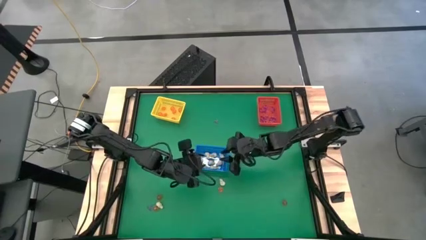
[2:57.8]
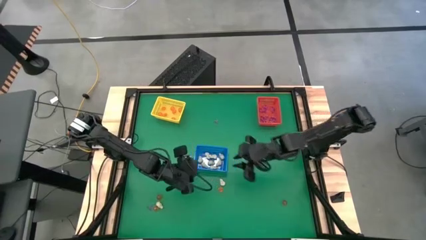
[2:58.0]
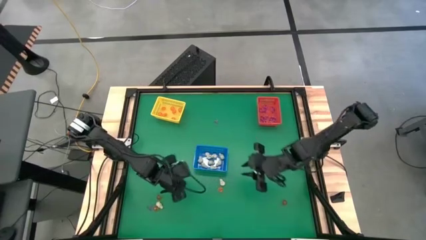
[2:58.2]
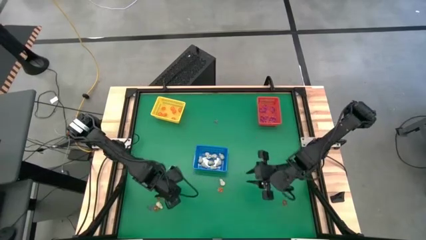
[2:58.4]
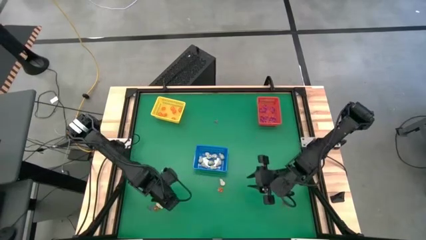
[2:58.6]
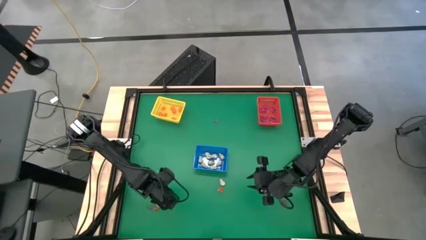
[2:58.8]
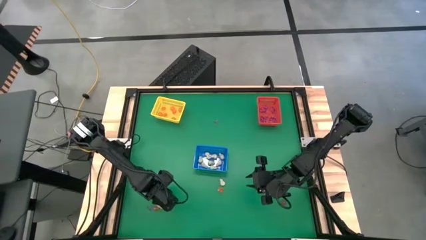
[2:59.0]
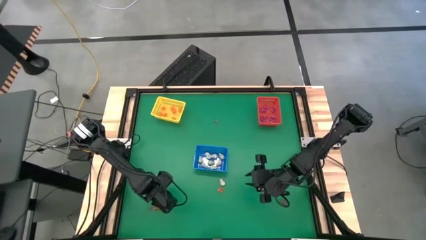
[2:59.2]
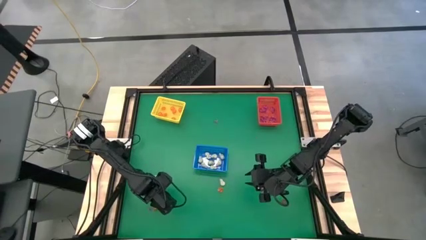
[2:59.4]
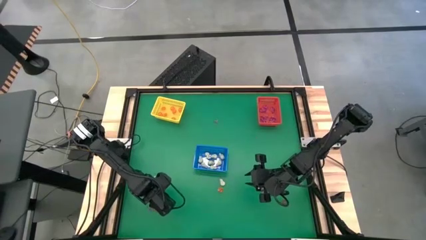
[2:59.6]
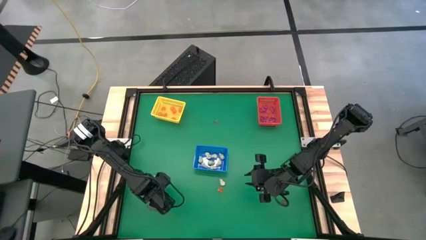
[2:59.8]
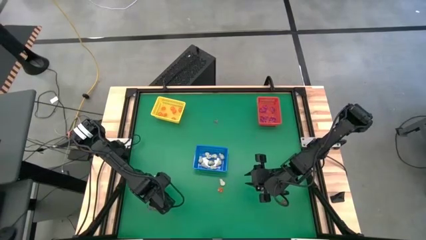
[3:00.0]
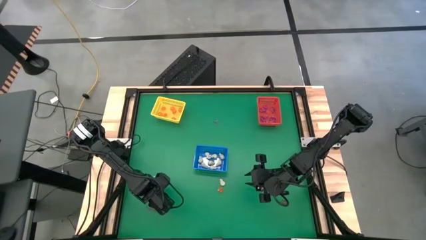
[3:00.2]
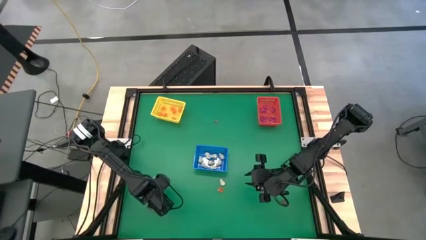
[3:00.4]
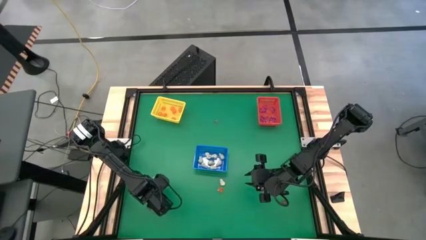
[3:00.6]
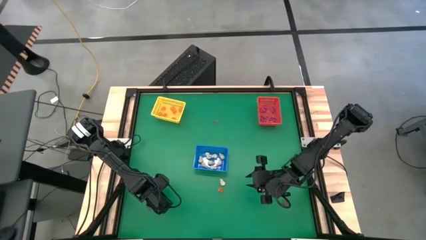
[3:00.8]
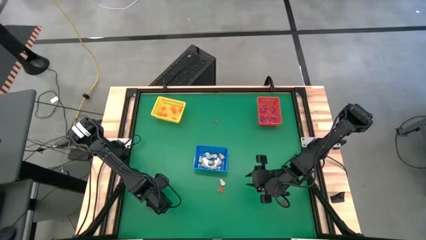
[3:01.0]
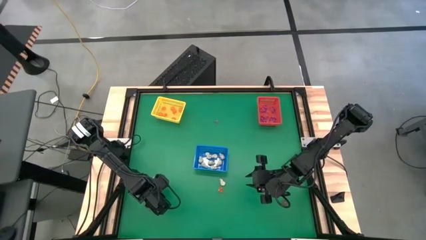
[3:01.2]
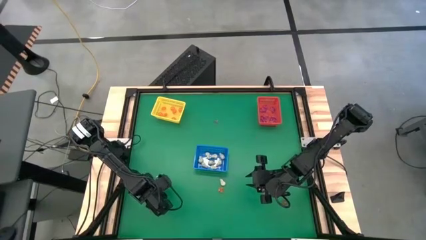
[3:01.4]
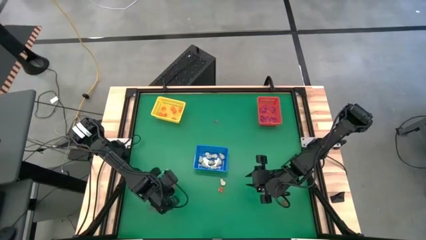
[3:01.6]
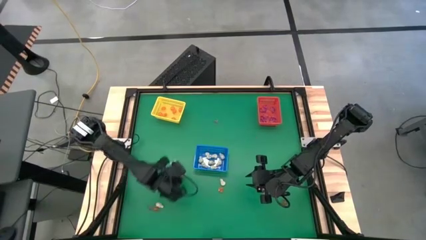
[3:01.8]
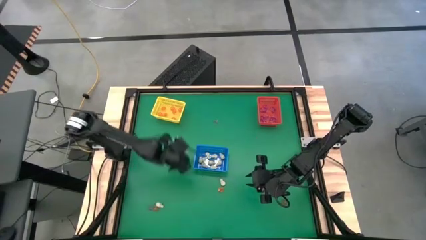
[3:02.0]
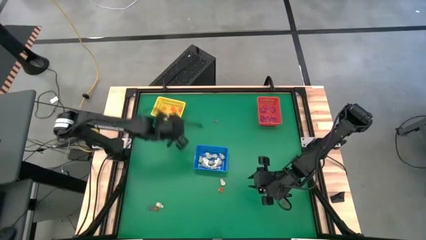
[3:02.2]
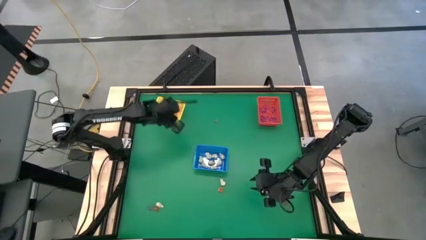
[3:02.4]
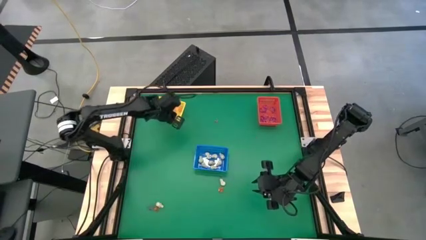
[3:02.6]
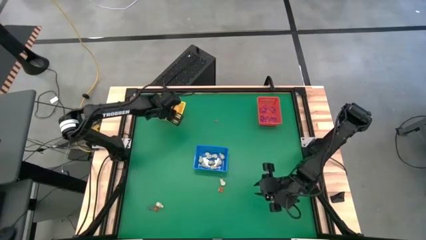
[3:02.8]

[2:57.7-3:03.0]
Task: Sort Halloween decoration
Put the orange pumpkin toy into the yellow bin

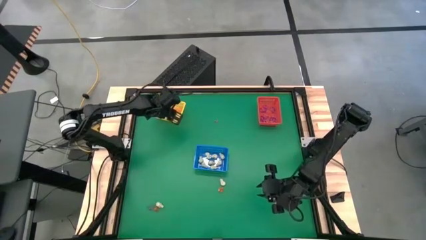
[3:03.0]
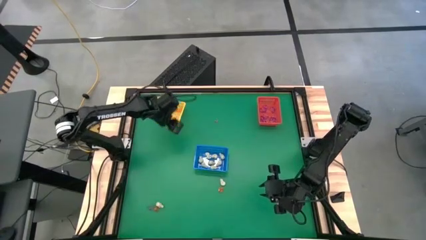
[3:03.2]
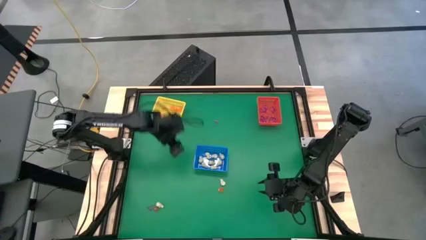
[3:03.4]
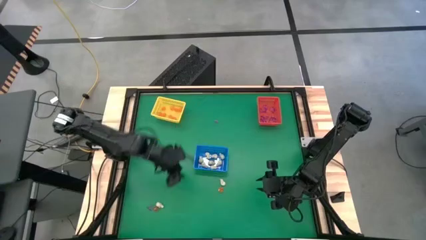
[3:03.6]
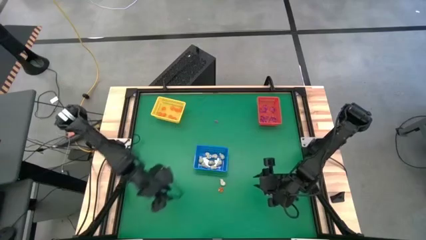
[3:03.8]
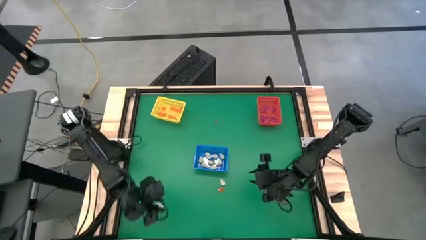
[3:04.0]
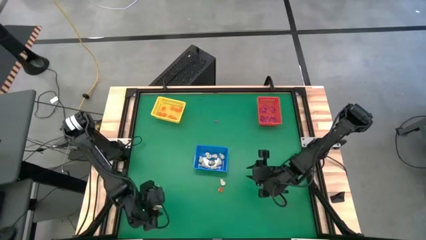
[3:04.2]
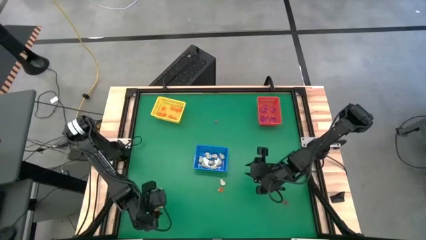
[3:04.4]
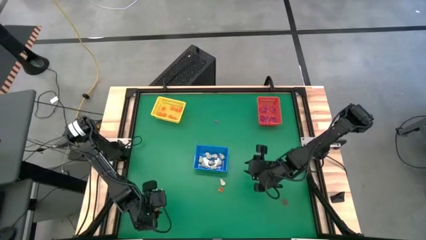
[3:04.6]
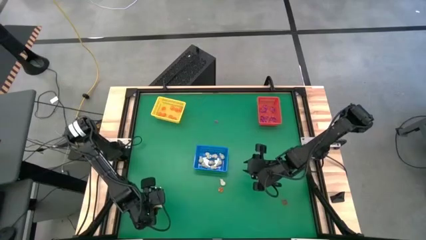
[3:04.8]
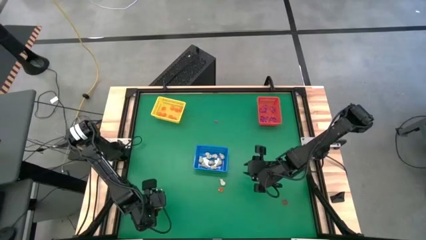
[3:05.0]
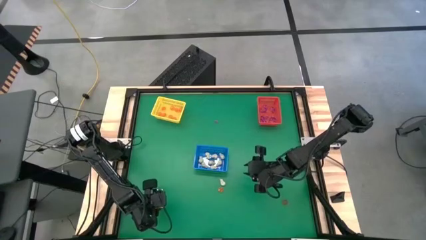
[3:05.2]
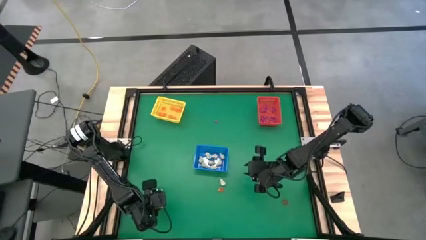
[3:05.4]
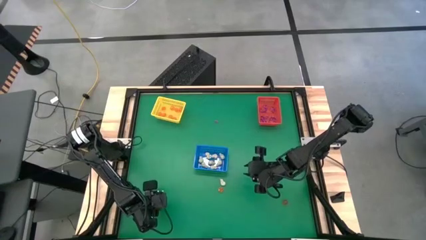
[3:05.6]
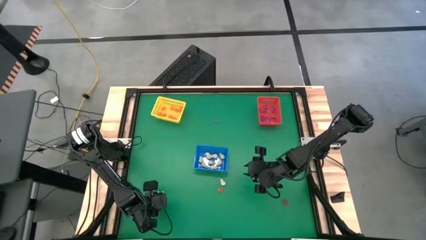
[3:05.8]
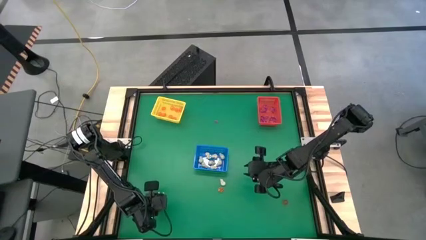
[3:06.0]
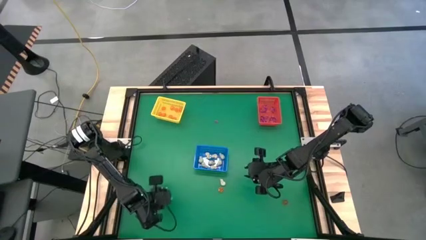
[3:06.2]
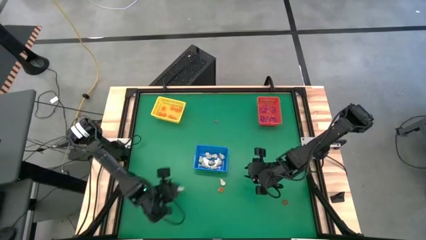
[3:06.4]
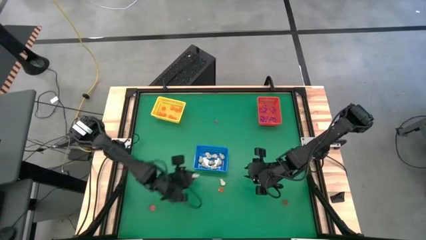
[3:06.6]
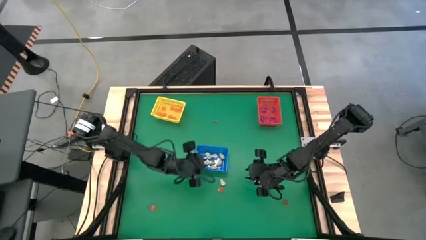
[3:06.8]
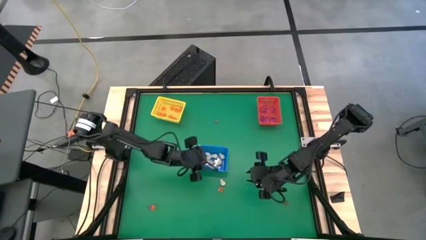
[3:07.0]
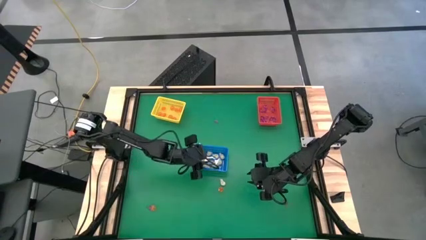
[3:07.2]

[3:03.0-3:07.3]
Put the white skull toy into the blue bin

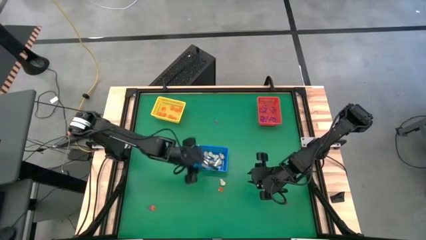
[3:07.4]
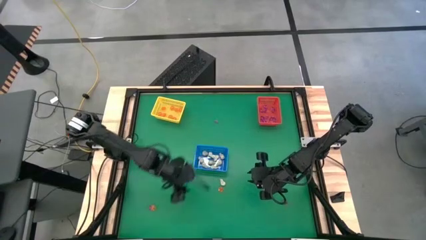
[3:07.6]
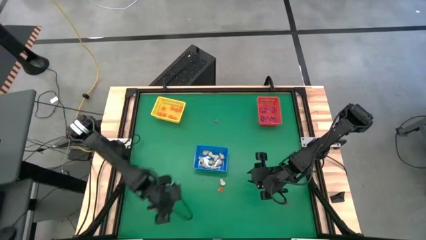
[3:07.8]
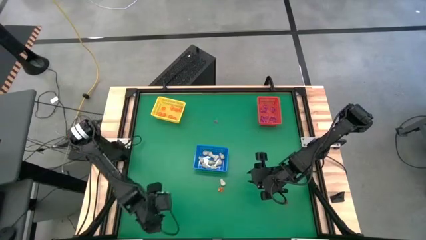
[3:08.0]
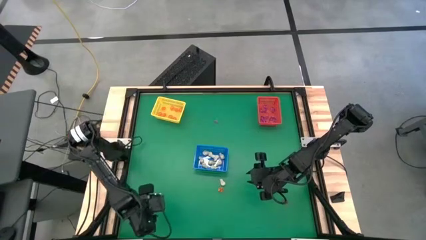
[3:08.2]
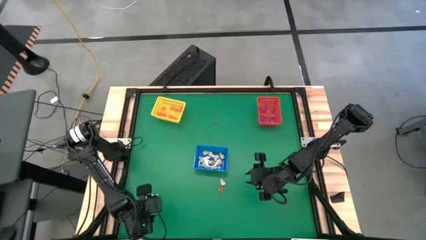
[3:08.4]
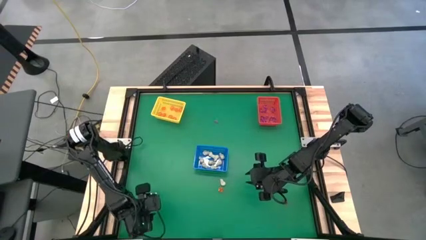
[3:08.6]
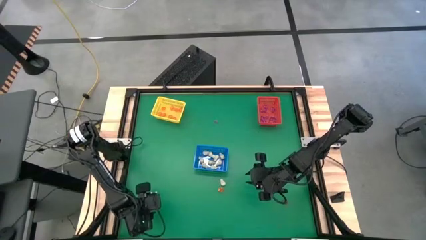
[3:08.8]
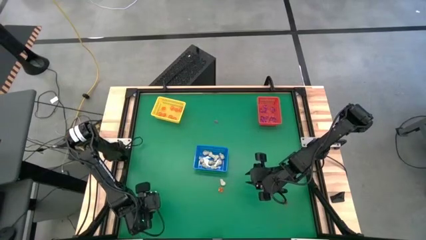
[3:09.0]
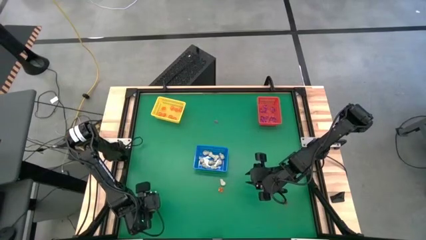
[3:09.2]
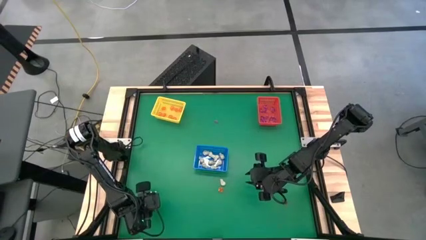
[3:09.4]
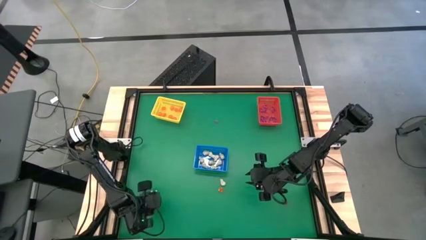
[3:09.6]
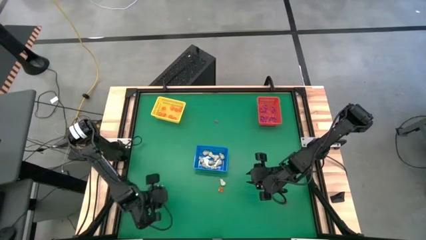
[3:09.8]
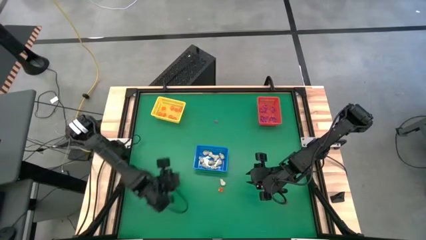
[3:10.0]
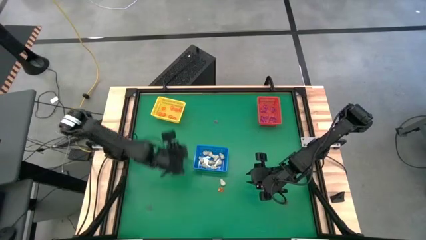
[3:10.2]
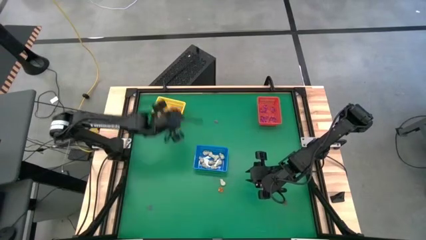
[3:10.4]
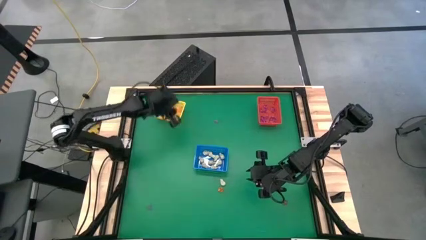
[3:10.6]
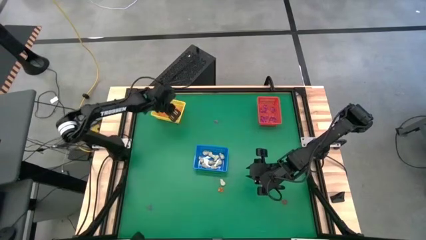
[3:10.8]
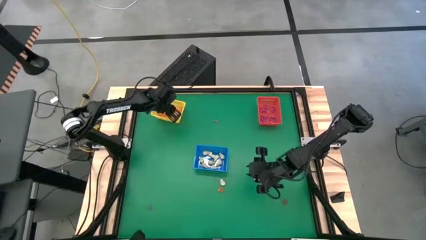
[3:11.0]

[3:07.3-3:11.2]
Put the orange pumpkin toy into the yellow bin

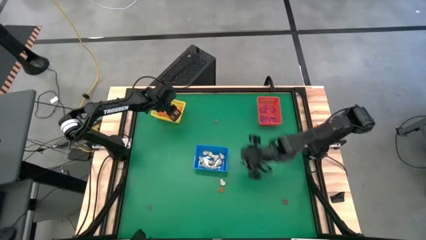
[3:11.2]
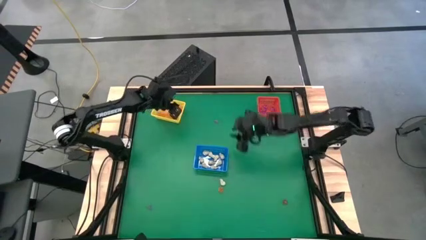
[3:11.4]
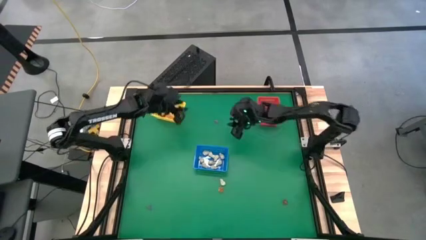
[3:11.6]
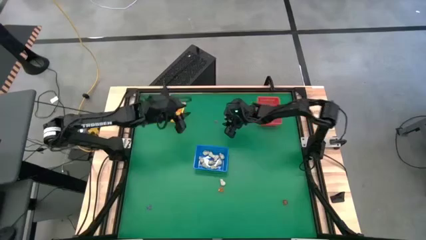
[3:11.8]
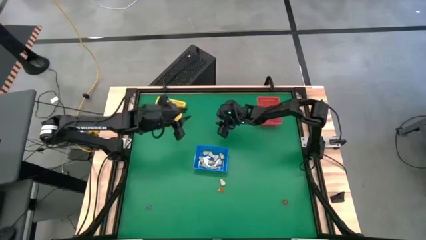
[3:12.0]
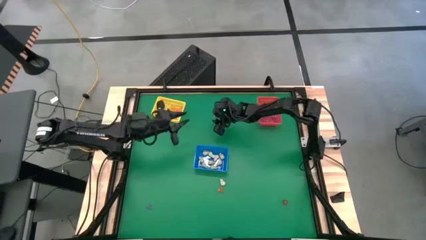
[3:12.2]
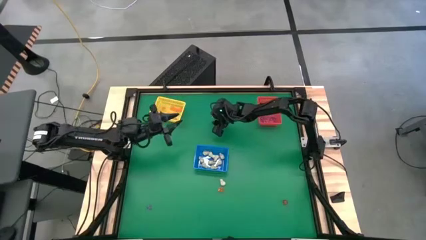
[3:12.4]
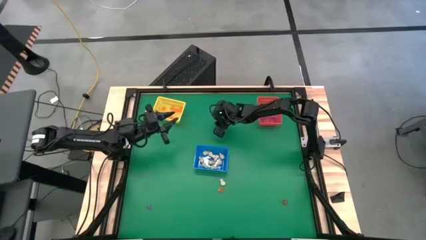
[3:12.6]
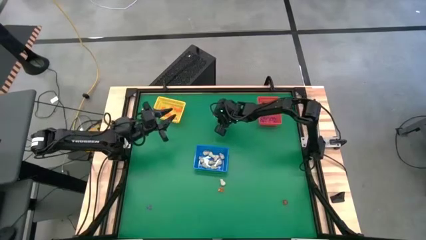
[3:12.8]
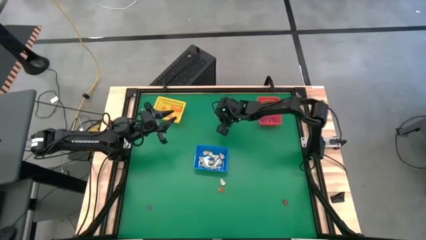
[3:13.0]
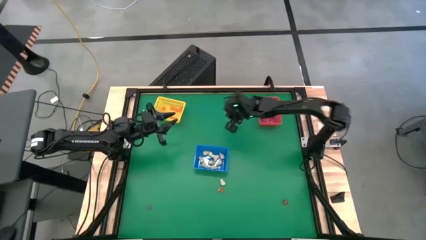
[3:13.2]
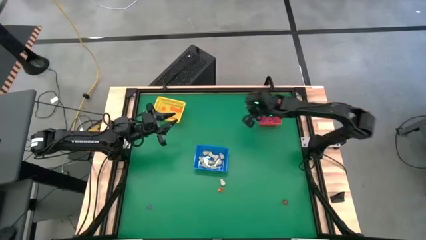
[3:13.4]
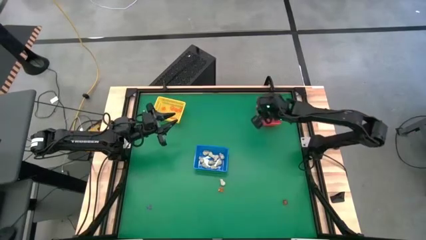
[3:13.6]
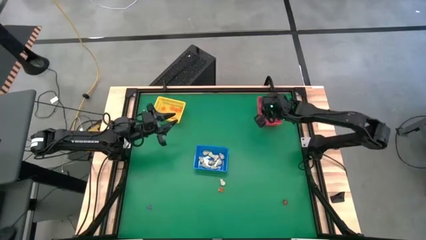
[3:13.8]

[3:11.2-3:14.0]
Put the purple witch hat toy into the red bin
